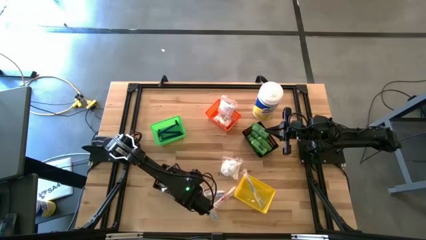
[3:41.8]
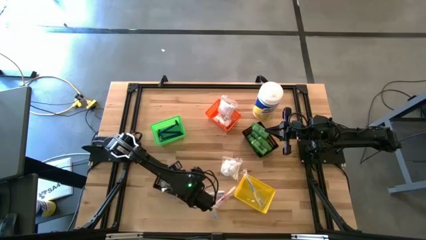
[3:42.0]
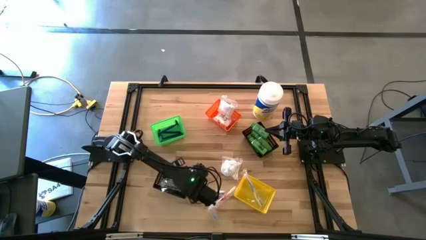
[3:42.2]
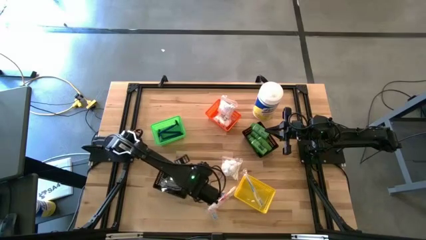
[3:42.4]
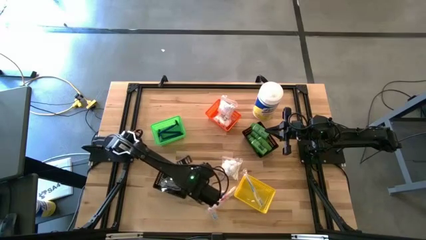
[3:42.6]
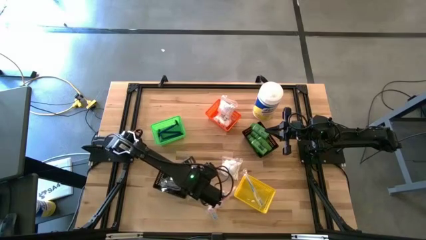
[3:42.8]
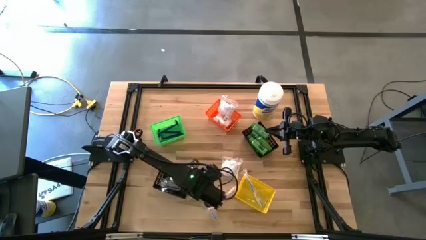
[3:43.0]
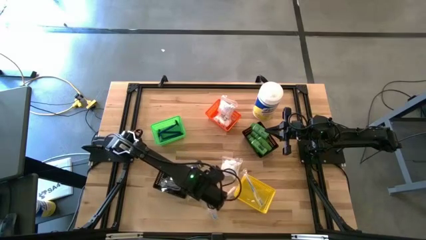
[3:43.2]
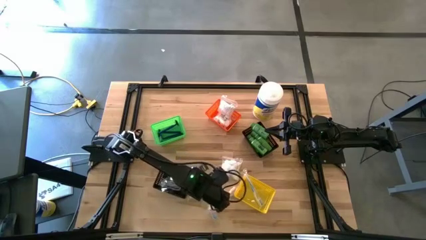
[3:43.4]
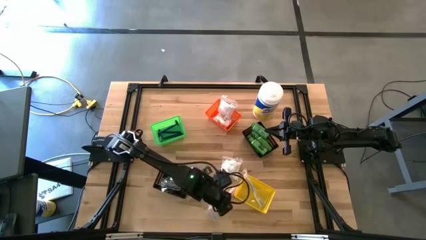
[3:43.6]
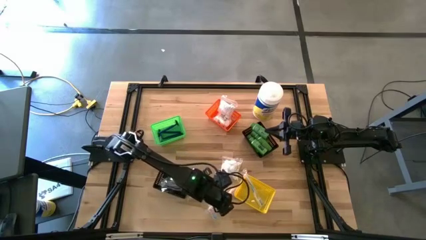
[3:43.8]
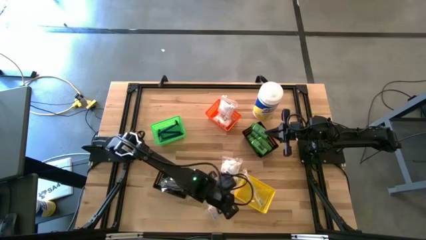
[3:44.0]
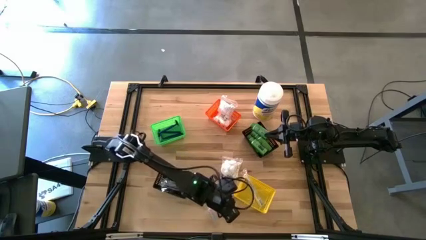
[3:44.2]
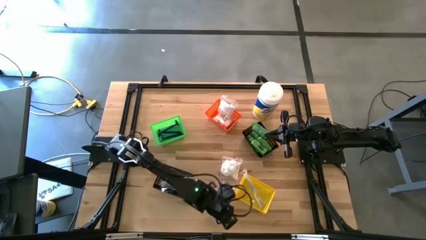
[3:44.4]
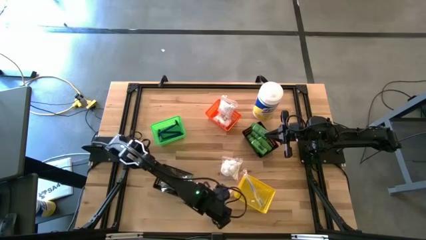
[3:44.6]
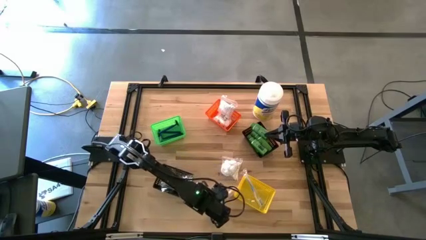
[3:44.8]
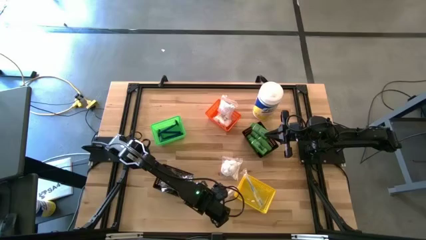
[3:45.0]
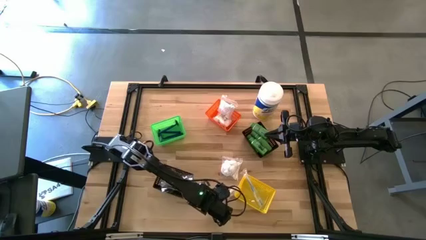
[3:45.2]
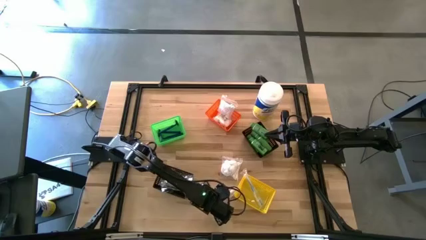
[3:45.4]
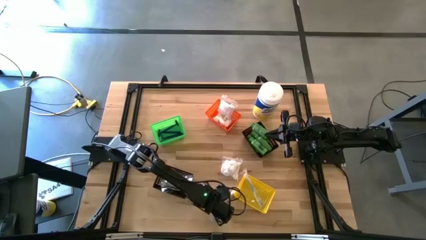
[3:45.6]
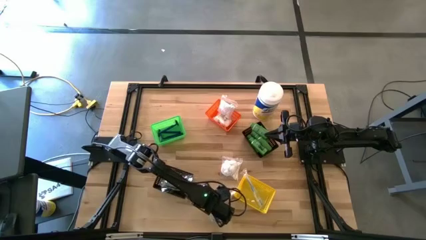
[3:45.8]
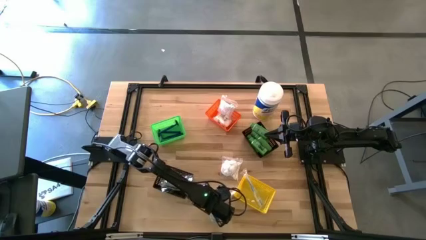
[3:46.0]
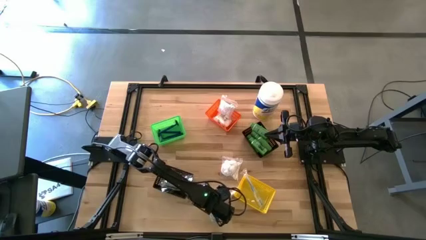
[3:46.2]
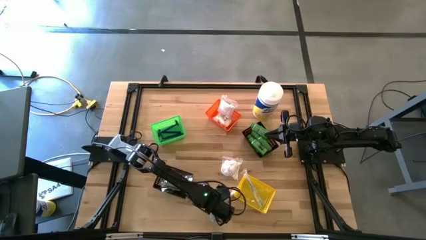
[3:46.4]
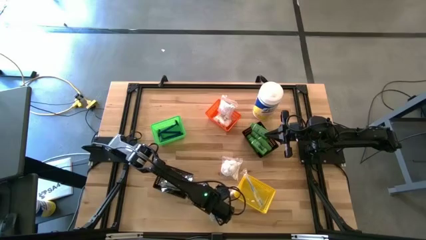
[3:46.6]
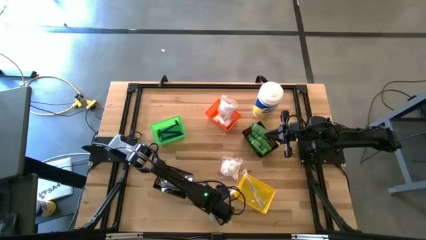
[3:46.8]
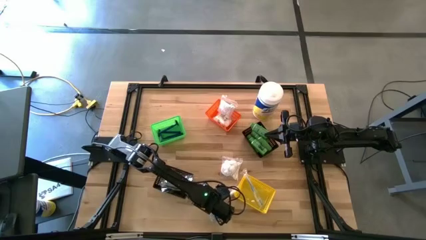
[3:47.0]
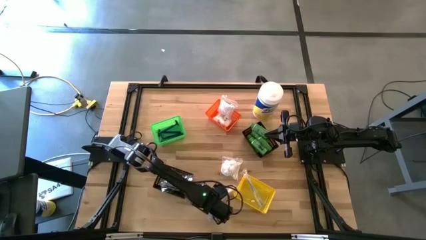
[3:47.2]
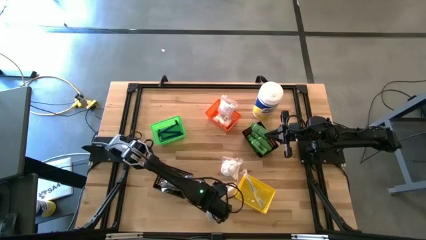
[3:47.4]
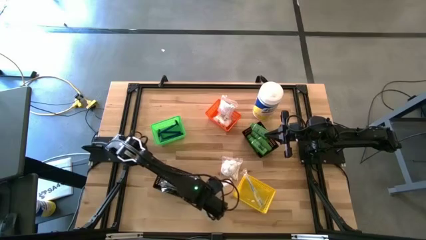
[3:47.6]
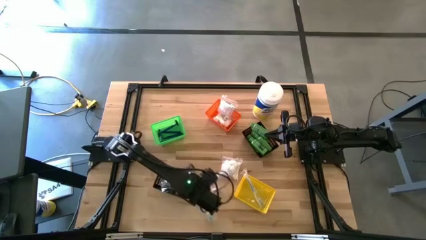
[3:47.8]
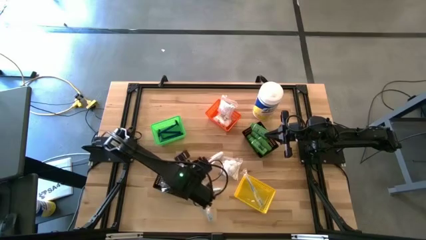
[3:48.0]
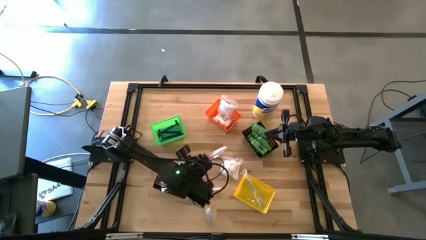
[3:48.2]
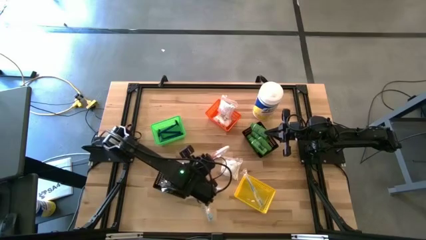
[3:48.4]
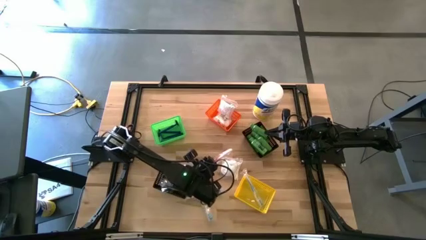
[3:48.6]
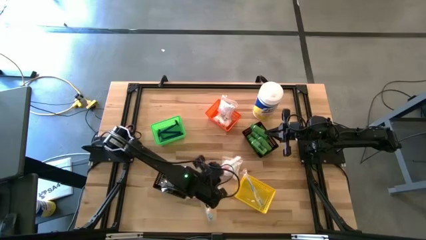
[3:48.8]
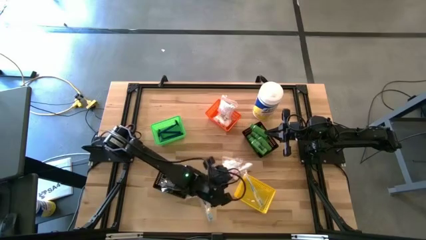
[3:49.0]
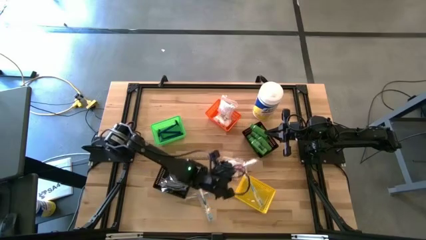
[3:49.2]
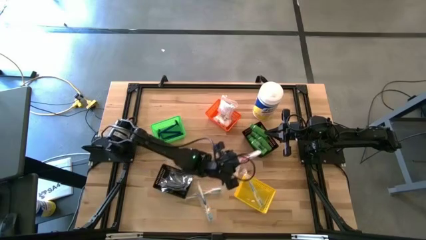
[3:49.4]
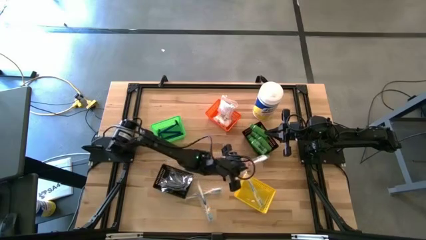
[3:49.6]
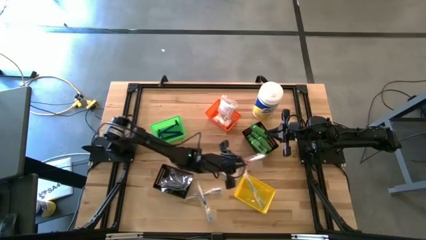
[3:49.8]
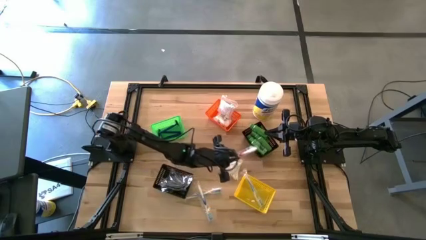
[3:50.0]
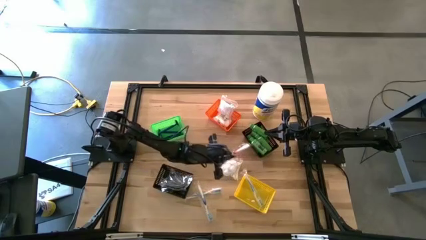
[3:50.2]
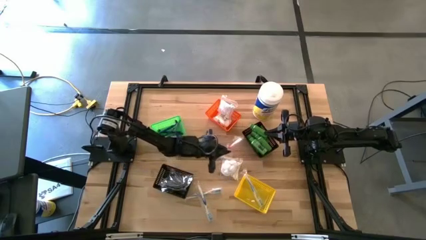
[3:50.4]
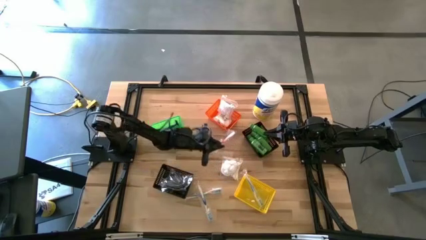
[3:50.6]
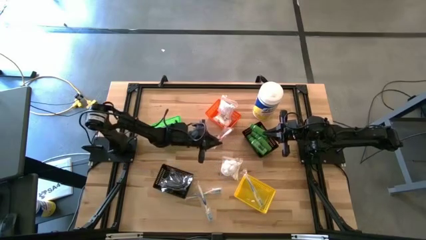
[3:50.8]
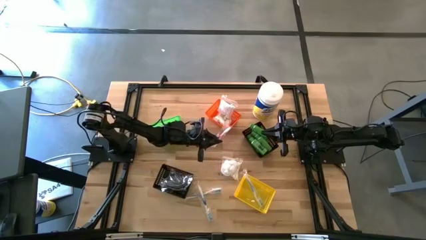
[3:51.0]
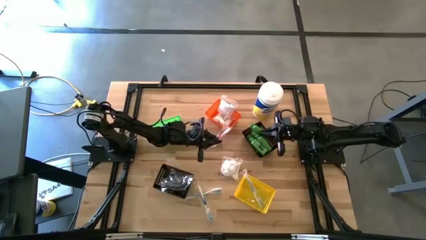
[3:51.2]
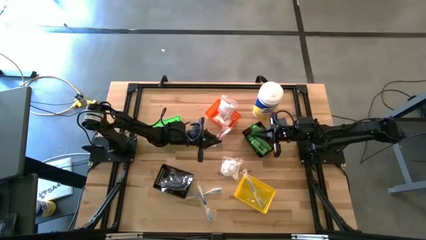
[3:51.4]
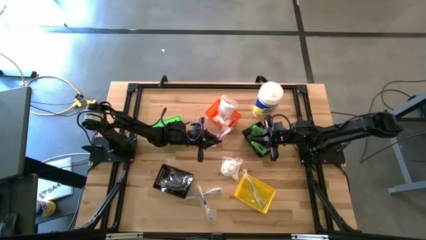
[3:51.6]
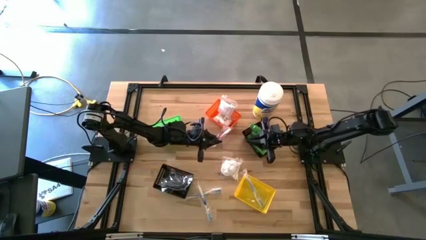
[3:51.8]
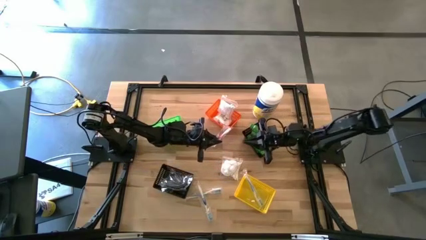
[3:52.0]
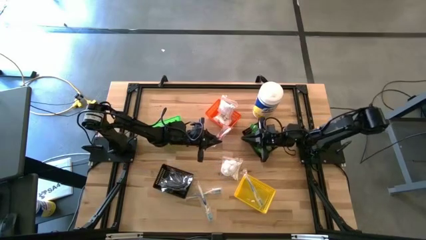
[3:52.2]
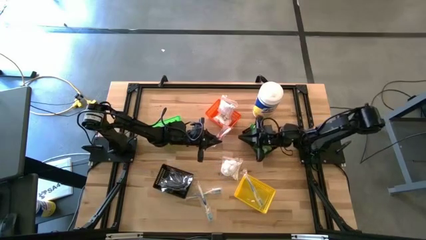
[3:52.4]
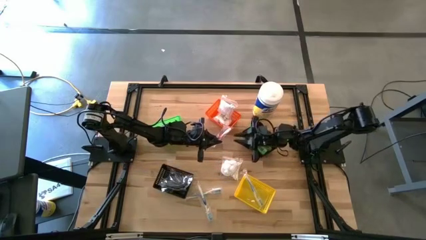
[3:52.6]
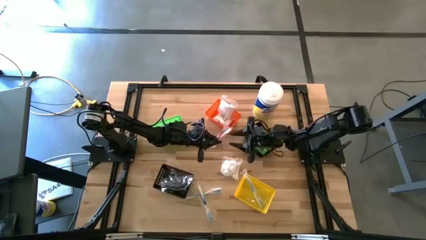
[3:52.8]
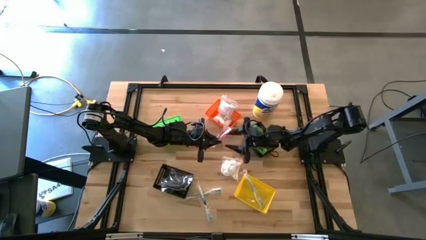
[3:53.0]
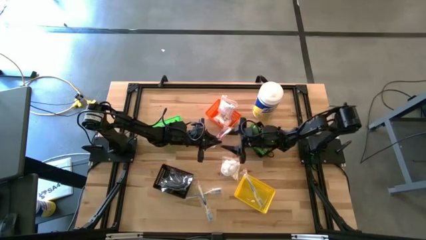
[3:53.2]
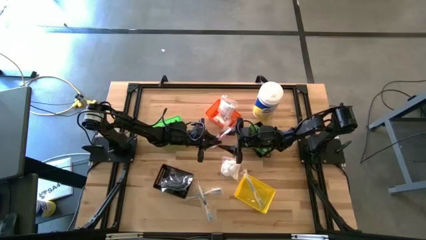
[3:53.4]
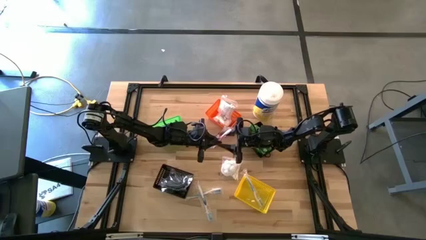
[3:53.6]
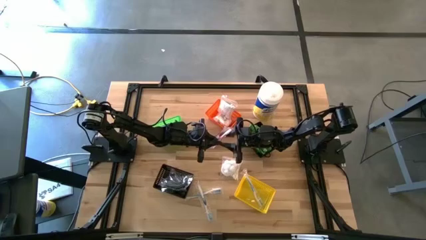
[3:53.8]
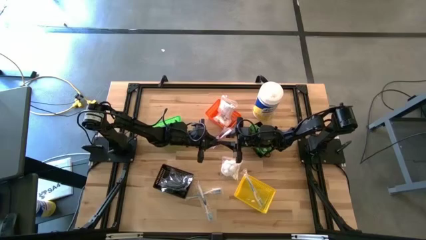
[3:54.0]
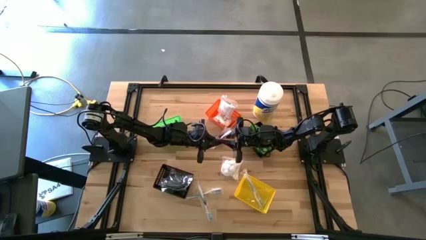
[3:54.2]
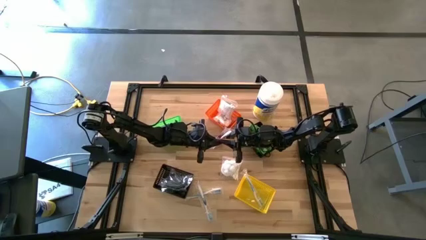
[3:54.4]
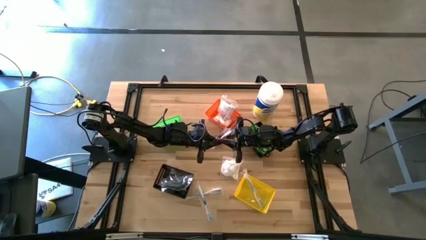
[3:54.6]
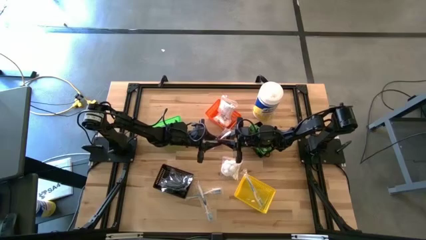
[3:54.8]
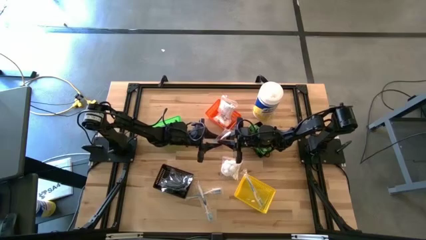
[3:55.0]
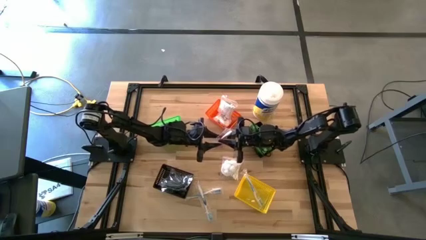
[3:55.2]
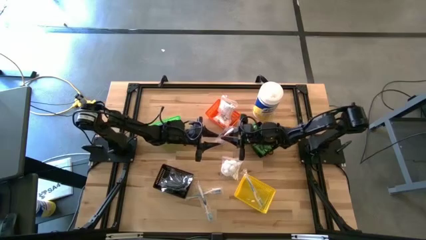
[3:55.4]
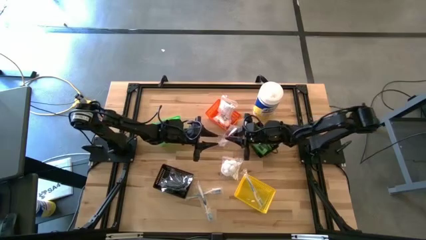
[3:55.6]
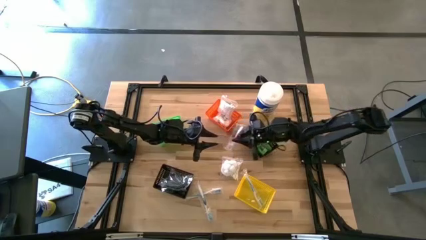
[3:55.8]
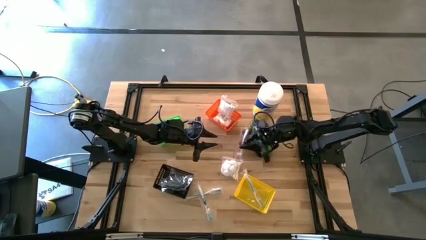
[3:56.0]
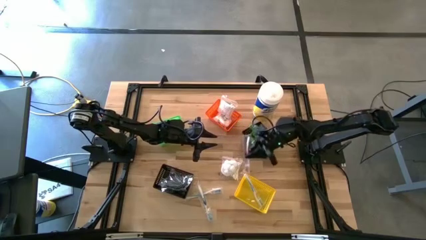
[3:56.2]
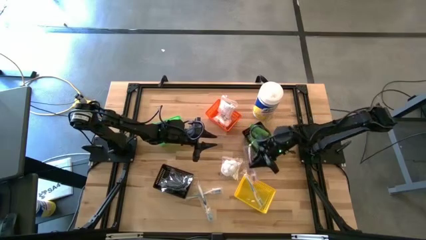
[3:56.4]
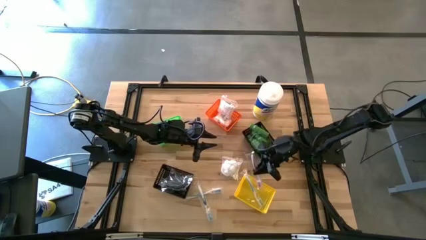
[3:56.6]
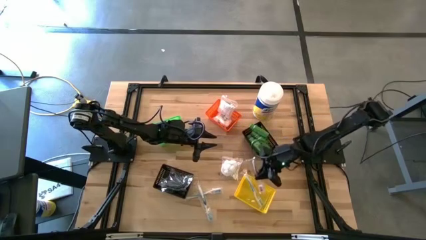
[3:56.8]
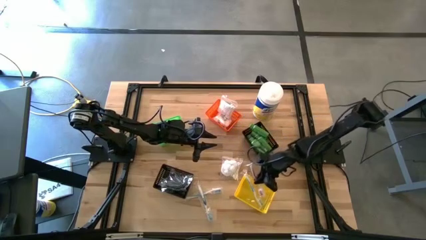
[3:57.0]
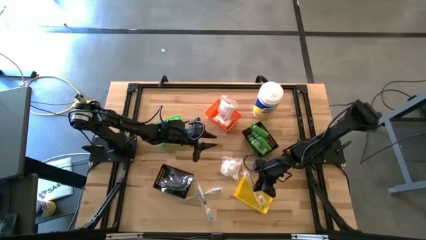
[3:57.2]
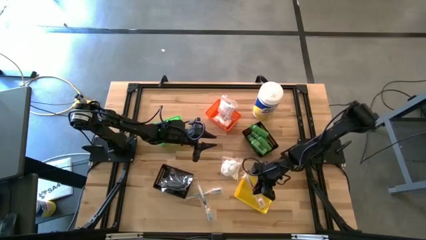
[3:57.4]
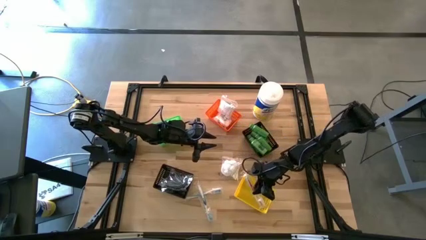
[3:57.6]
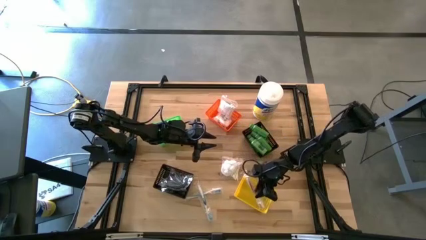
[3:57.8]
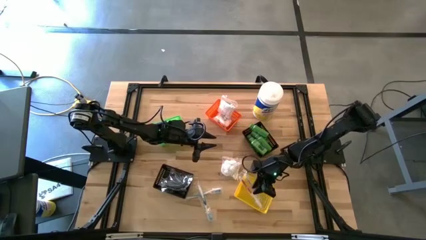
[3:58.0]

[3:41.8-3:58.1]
Task: Pick & Place Travel size toiletries
Put the orange toothbrush into the yellow bin
